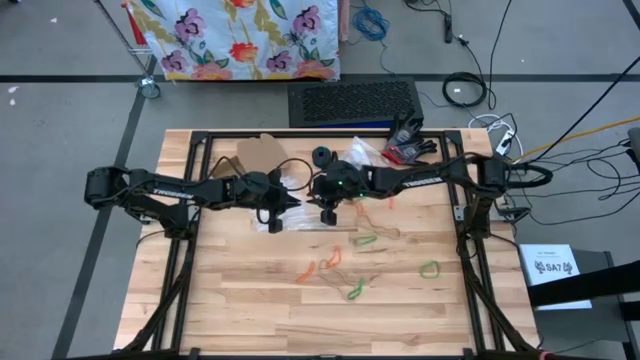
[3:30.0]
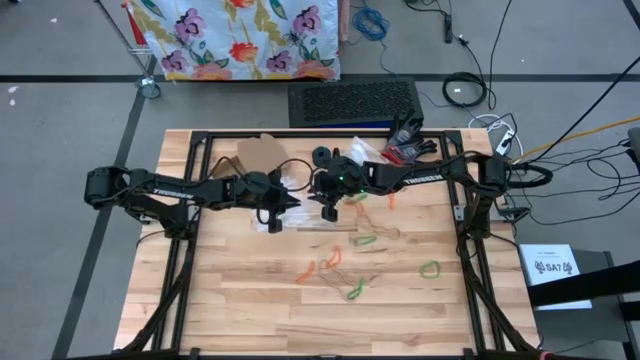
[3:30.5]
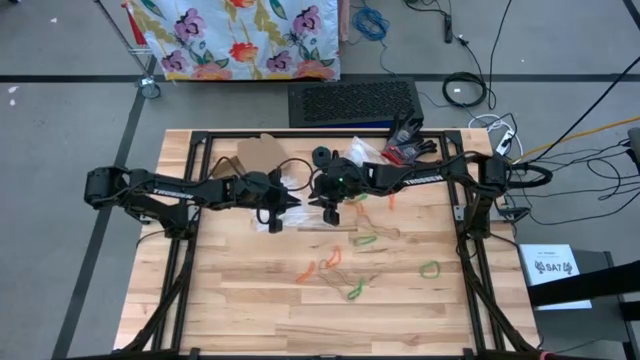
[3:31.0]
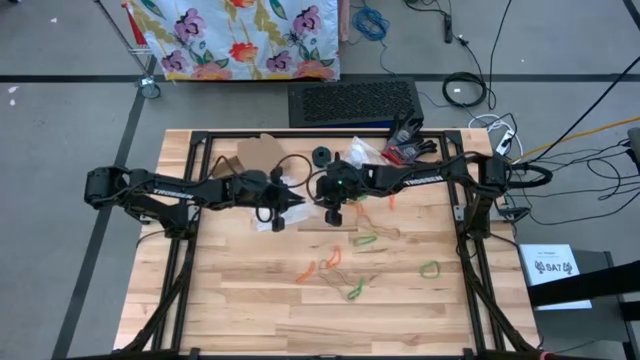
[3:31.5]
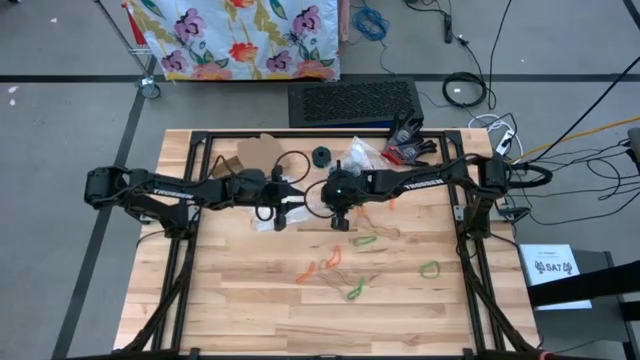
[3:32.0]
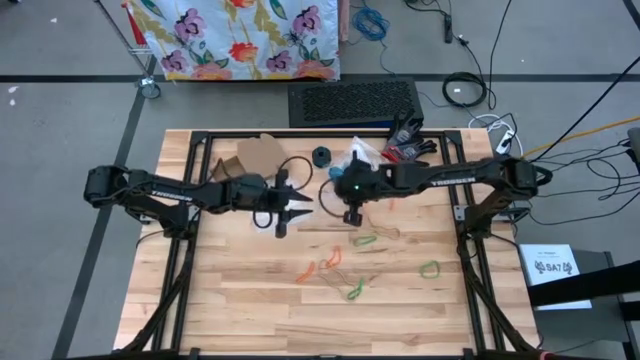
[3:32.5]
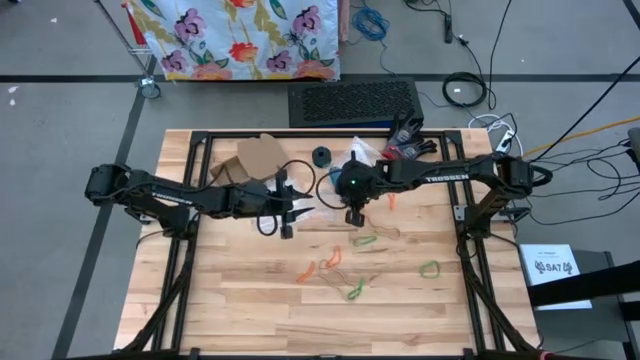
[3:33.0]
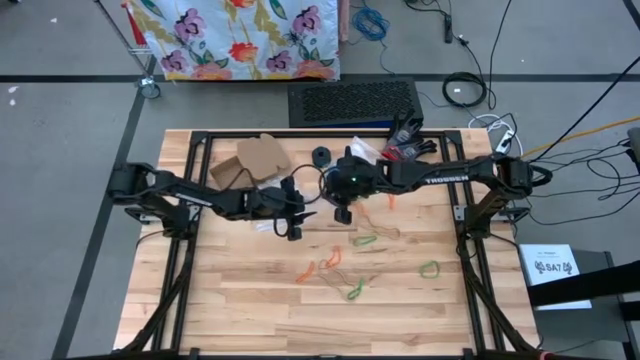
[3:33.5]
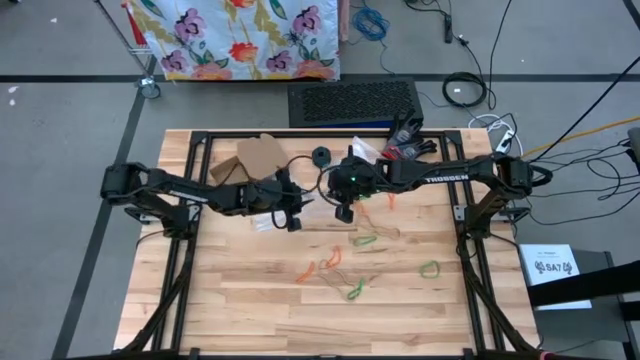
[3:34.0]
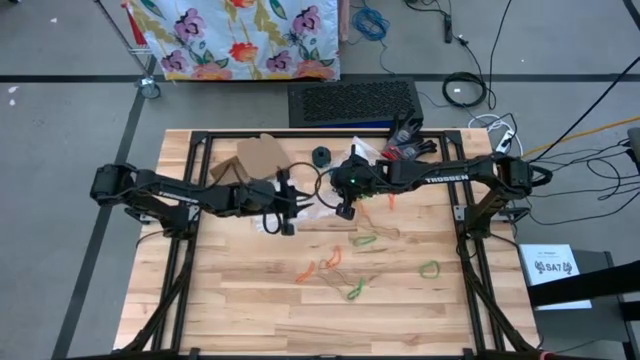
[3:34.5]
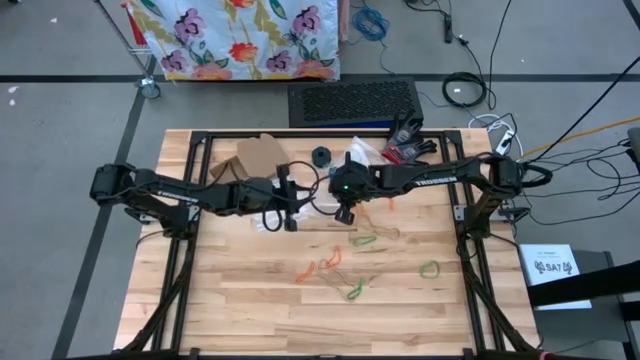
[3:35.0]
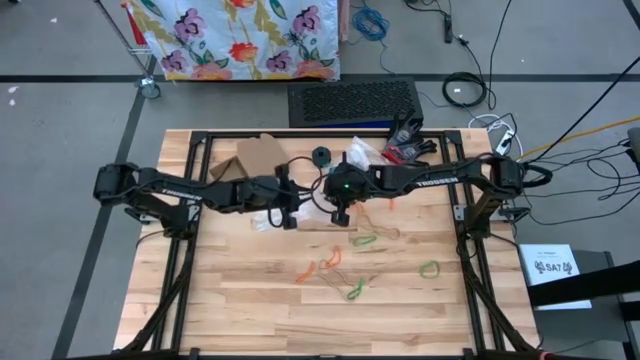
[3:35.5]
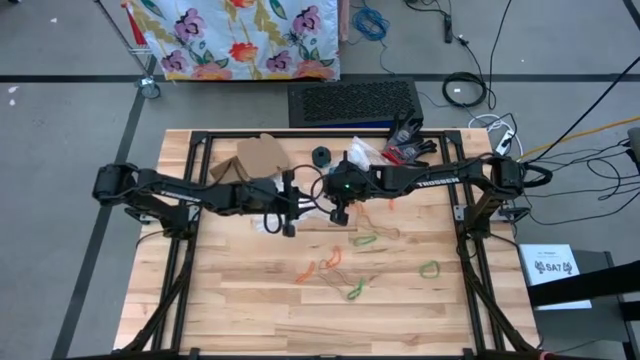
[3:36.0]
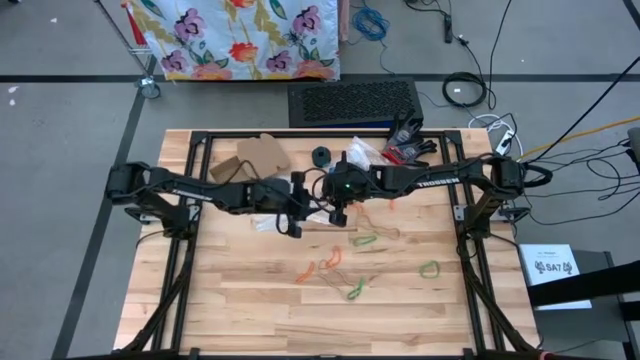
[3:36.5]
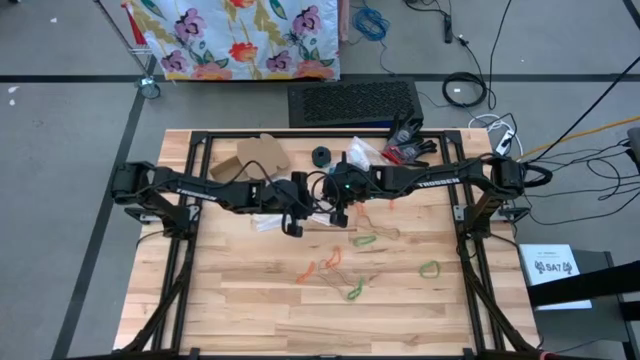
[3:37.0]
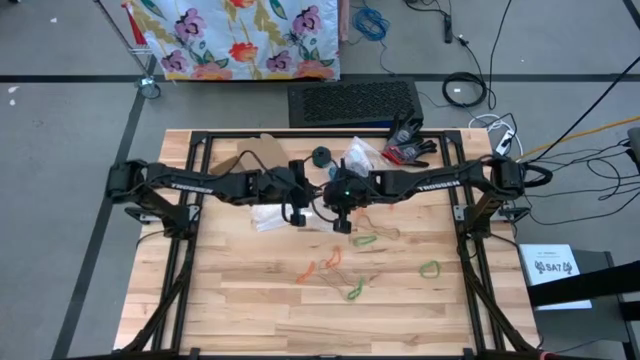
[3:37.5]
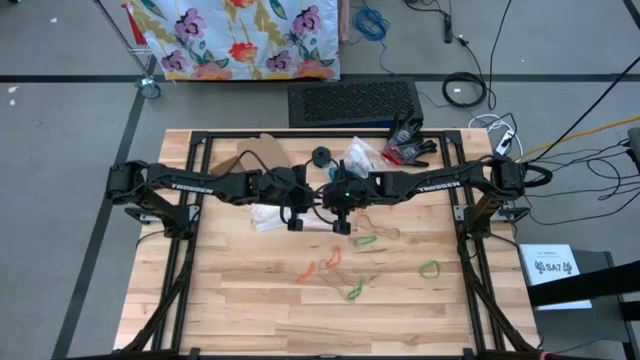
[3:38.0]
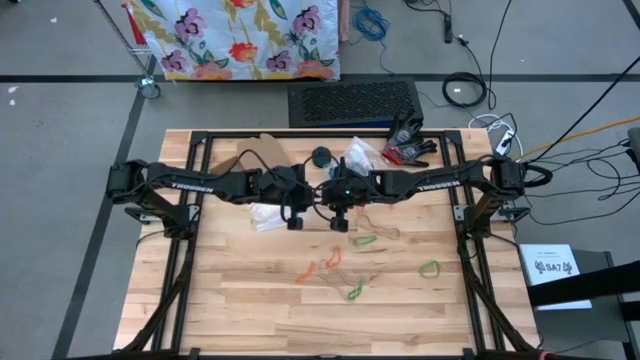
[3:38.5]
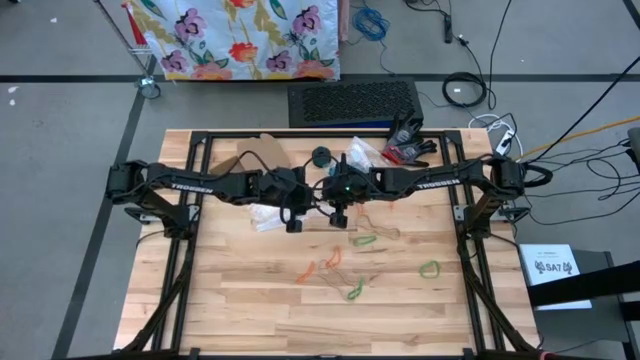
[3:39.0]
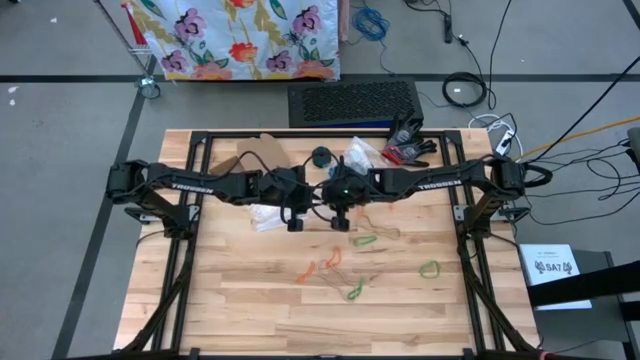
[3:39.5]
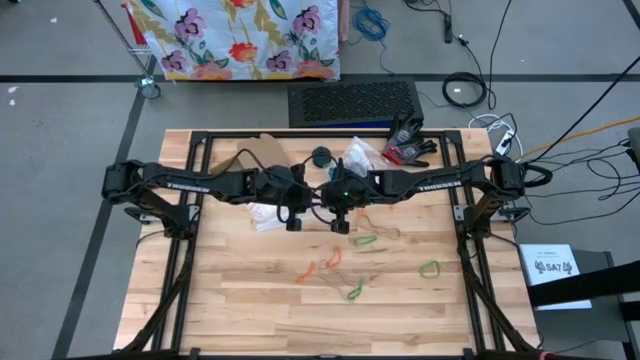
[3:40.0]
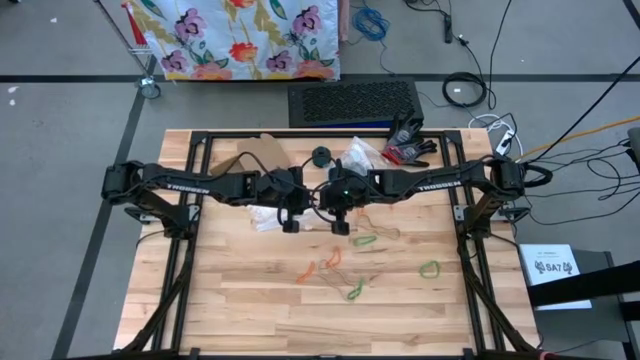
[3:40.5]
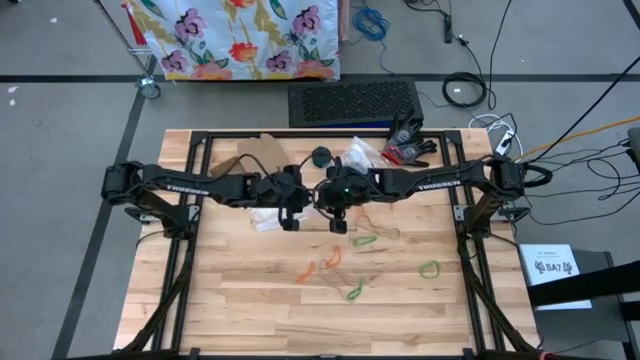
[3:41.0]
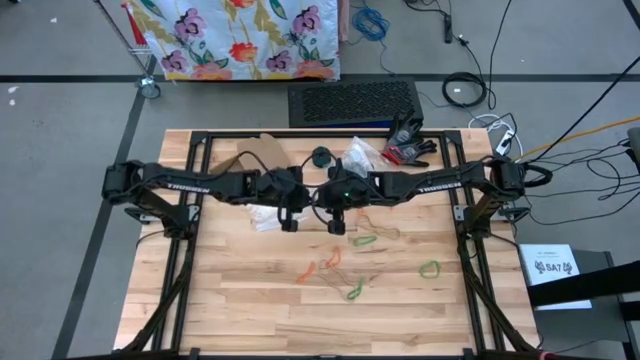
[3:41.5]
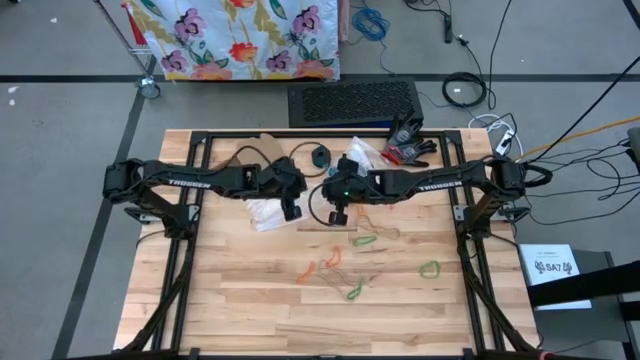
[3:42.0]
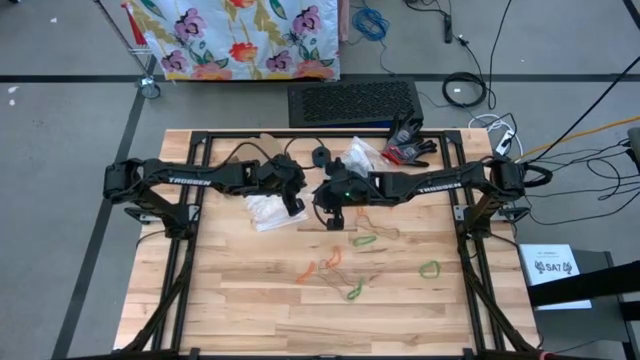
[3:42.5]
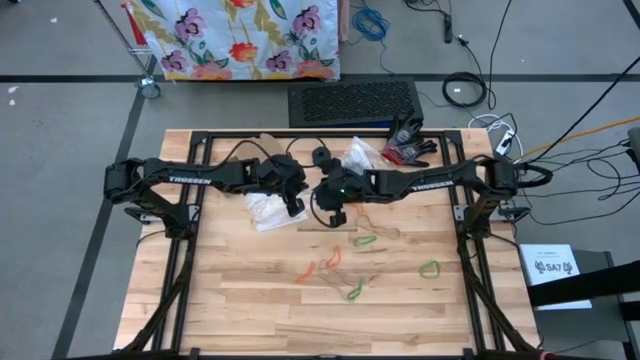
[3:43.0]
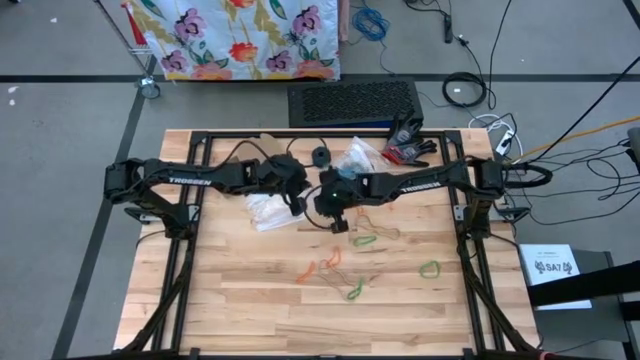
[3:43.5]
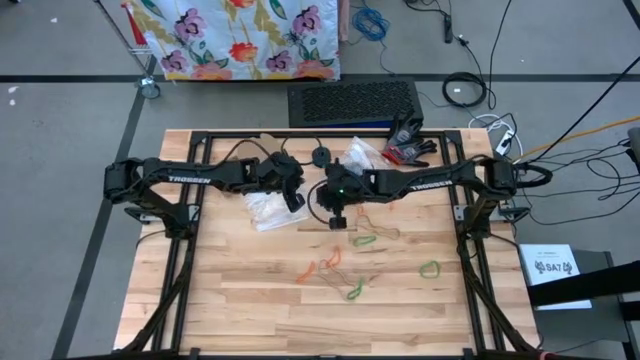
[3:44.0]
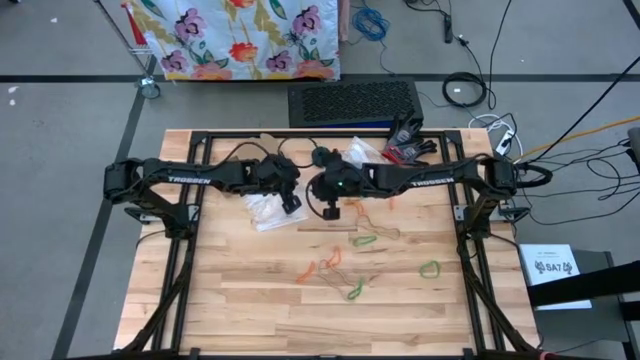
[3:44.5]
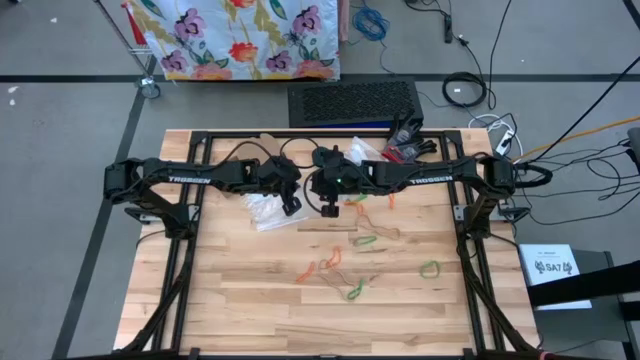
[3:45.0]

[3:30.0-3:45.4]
Task: Sort rubber bands
Open the transparent zip bag

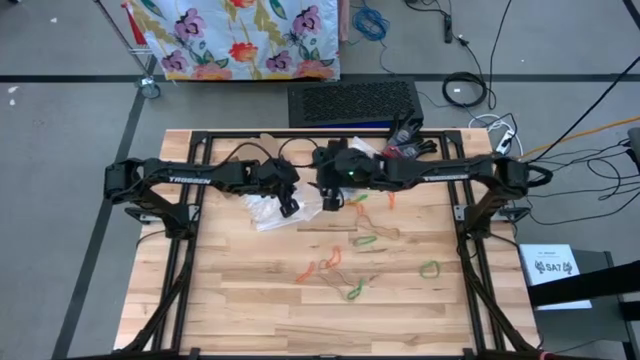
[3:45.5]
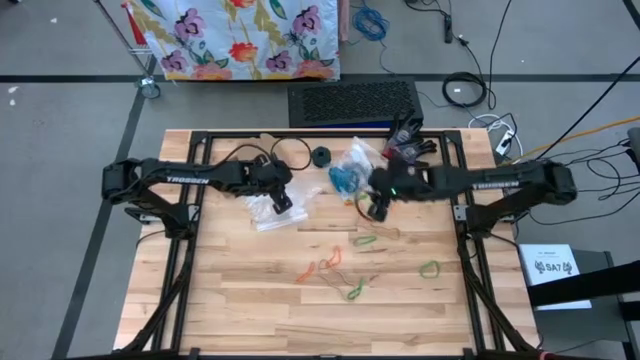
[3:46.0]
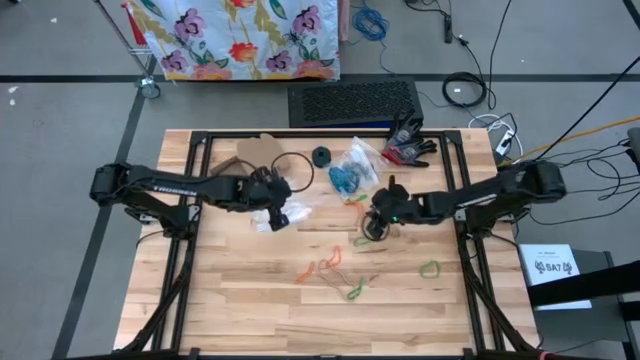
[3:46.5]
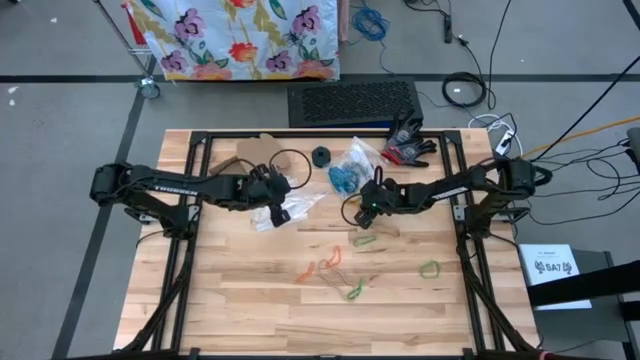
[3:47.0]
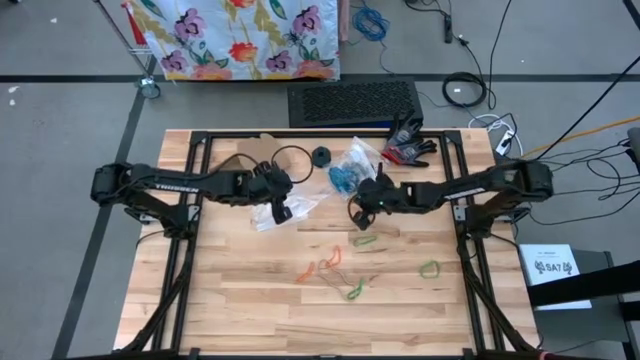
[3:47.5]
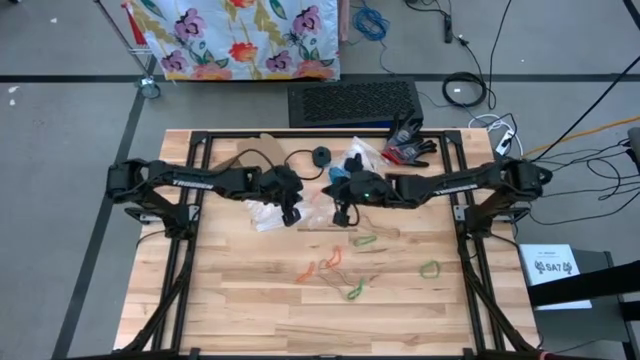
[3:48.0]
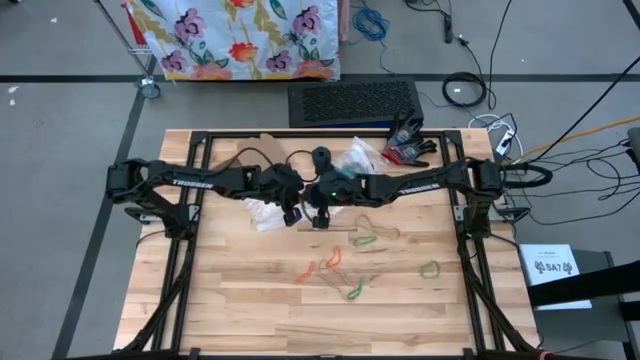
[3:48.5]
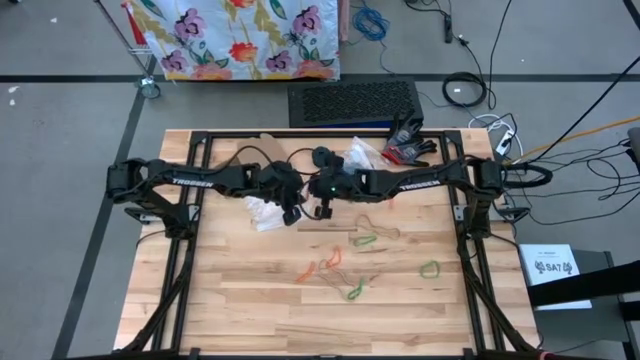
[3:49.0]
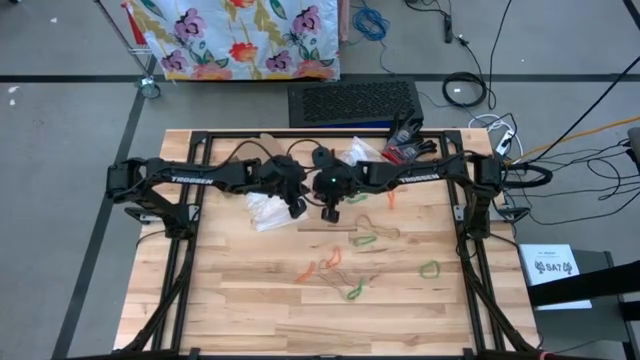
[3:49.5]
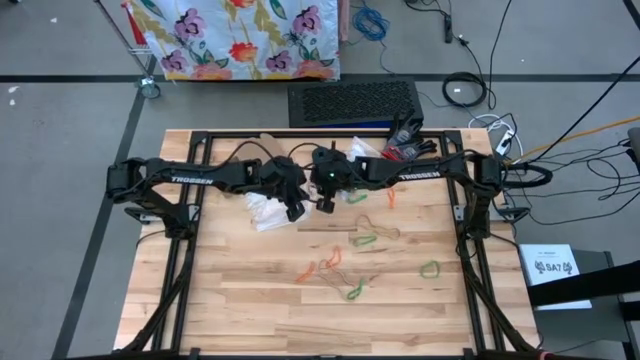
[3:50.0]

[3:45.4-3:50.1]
Put the orange rubber band into the transparent zip bag

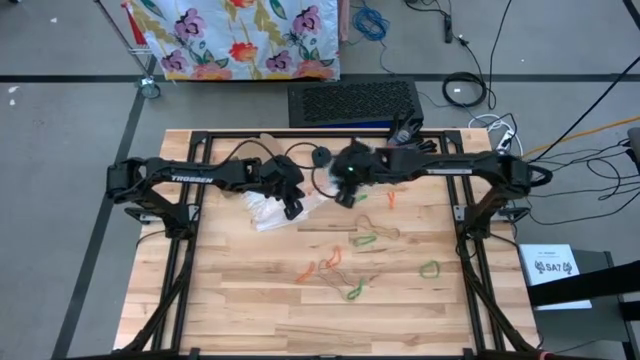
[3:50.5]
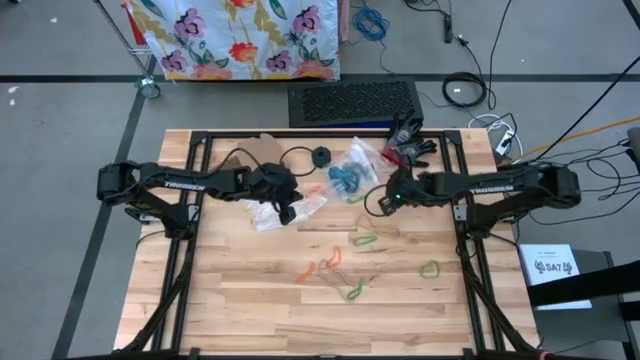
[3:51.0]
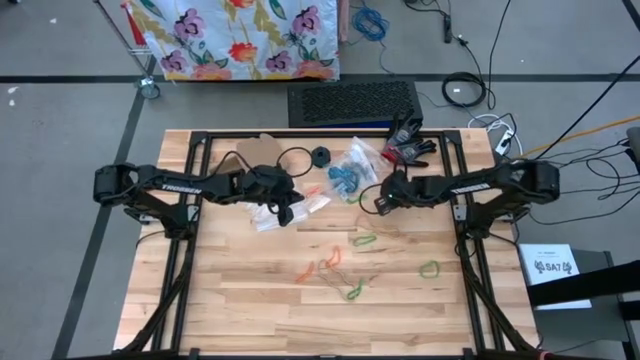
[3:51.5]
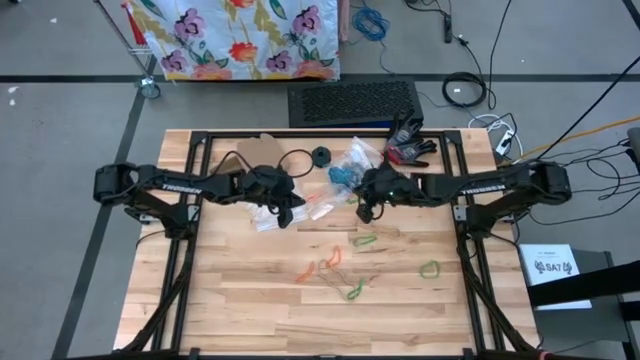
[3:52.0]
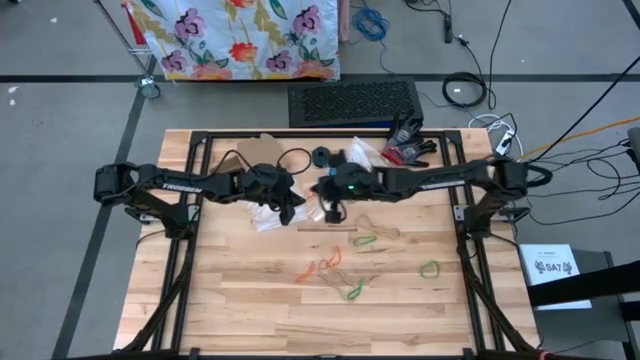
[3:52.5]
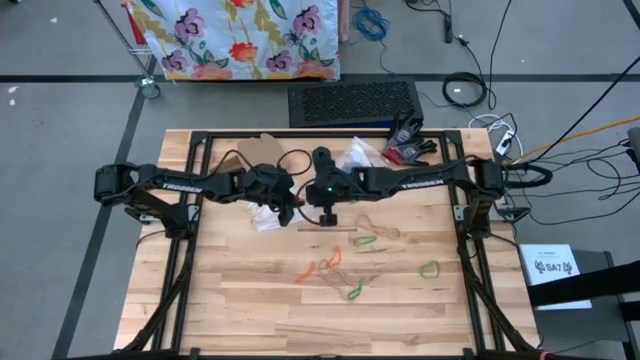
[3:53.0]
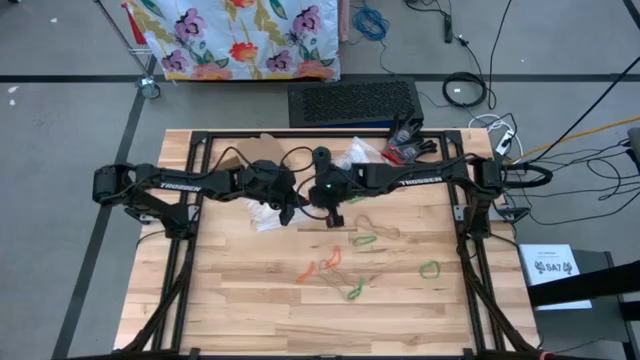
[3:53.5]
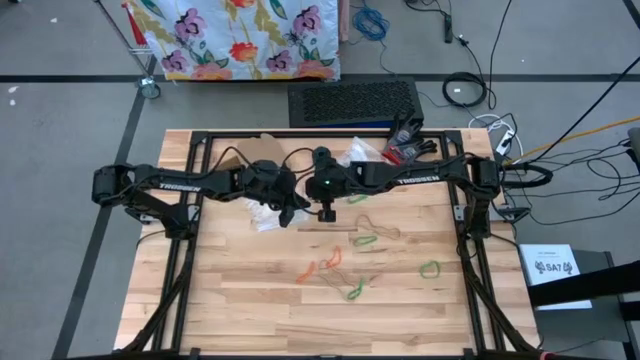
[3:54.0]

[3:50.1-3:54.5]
Put the orange rubber band into the transparent zip bag
